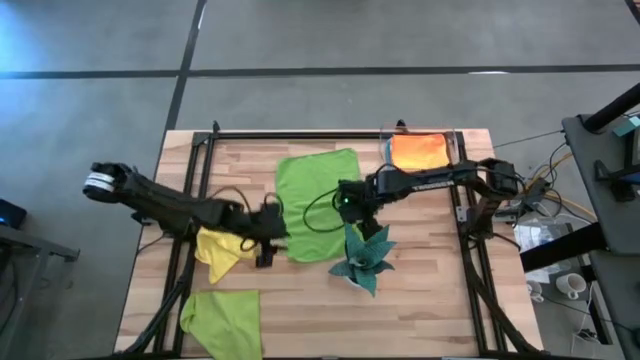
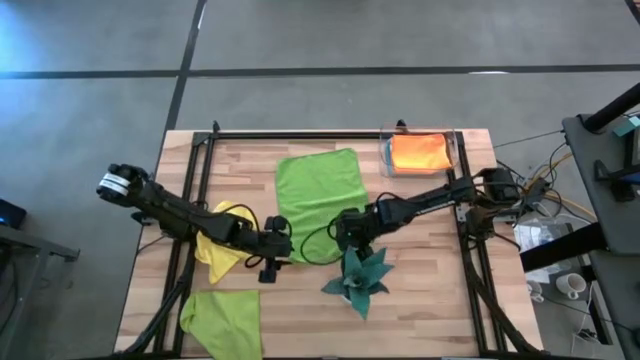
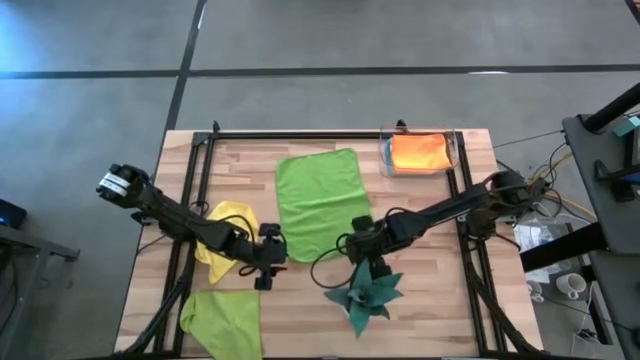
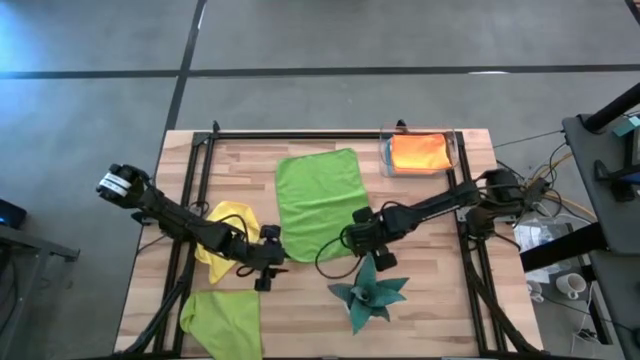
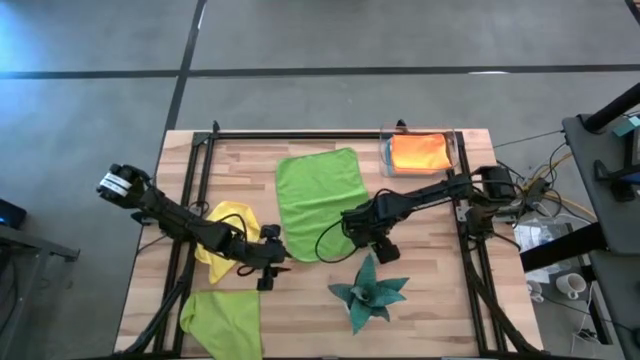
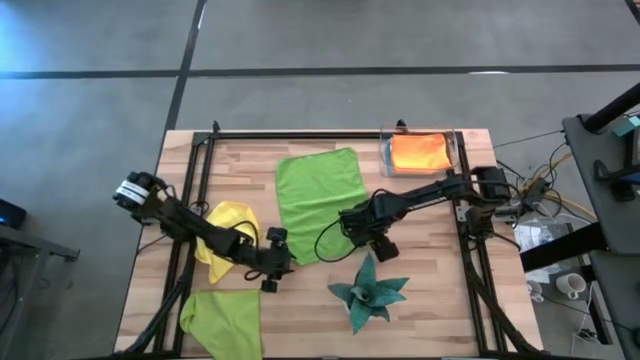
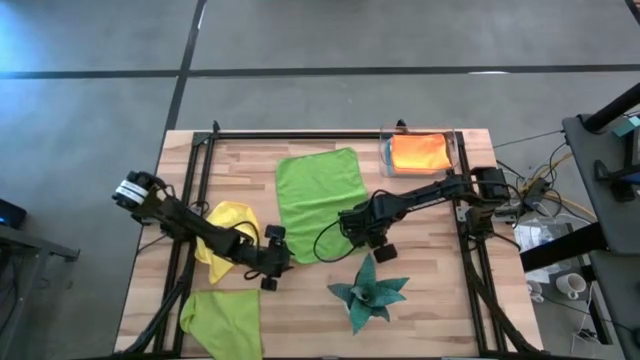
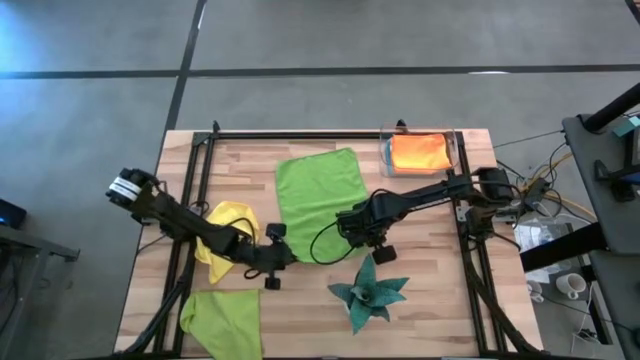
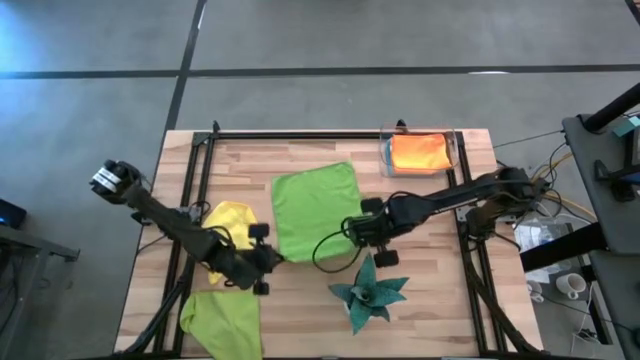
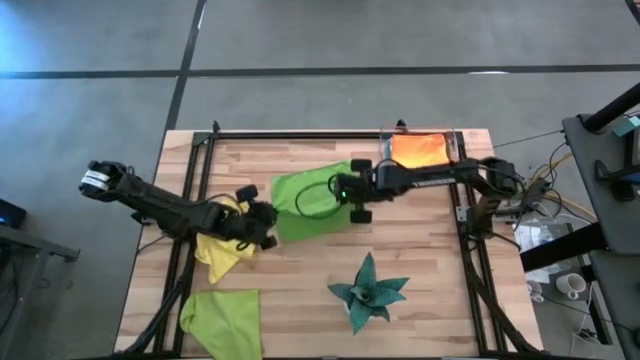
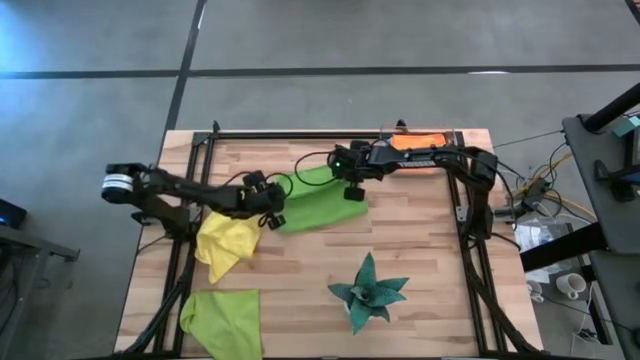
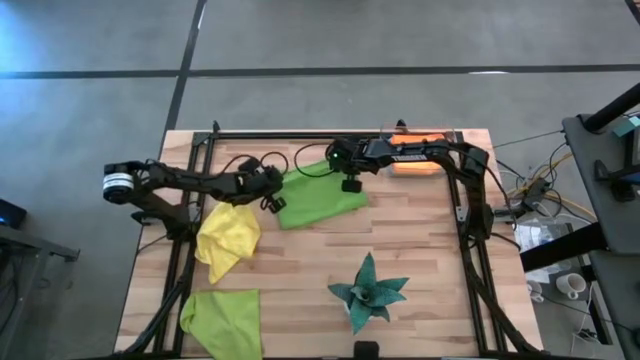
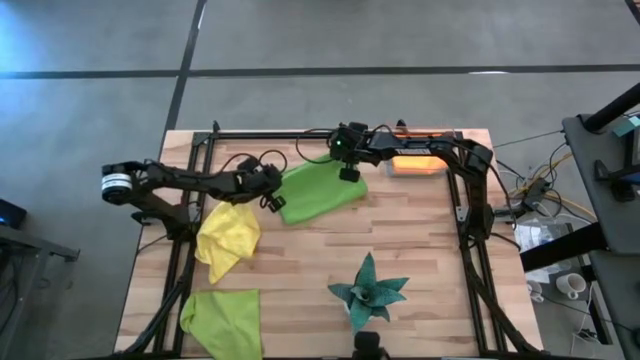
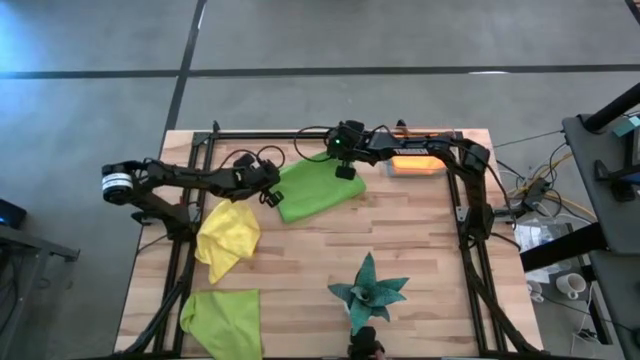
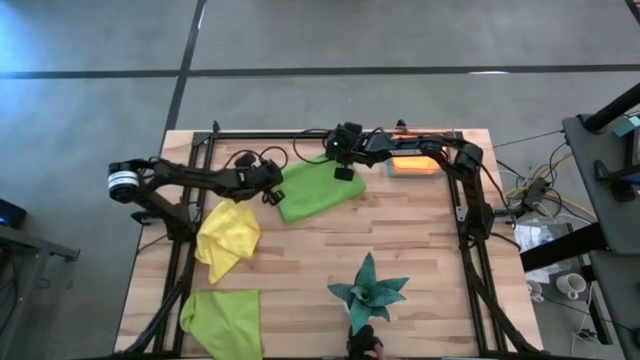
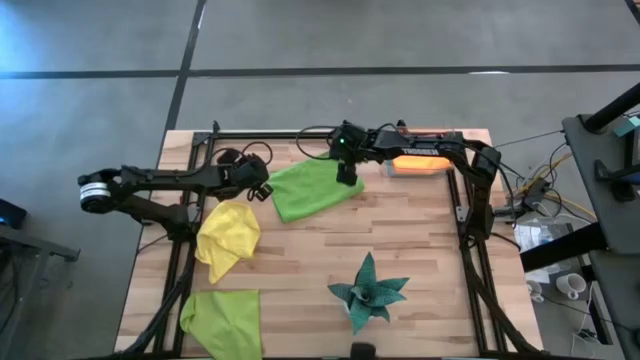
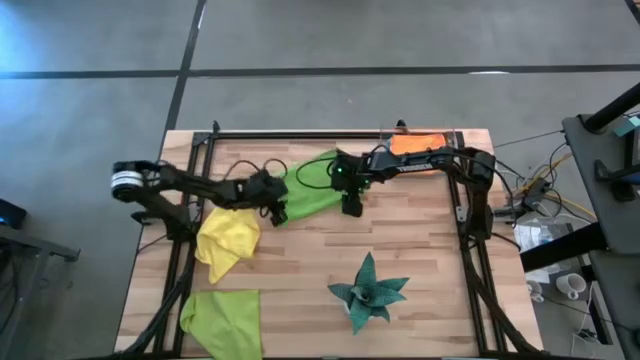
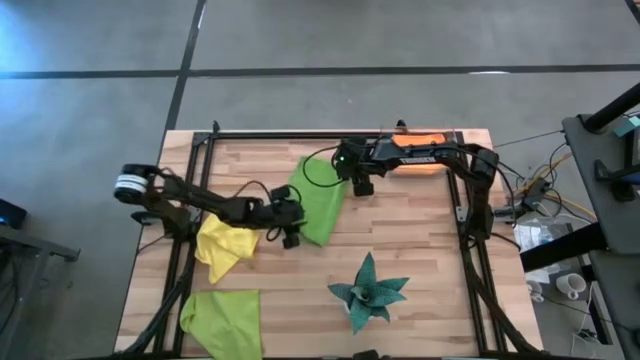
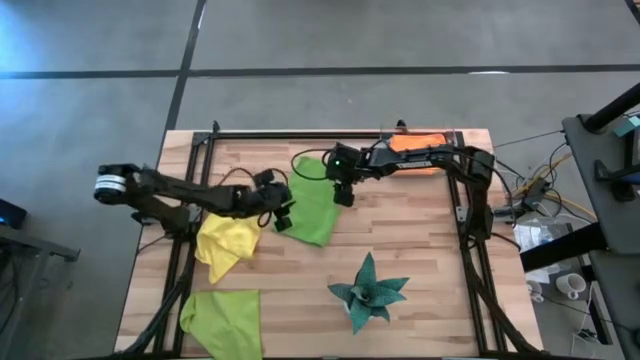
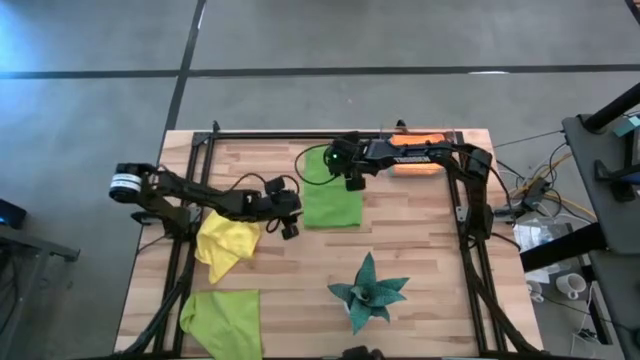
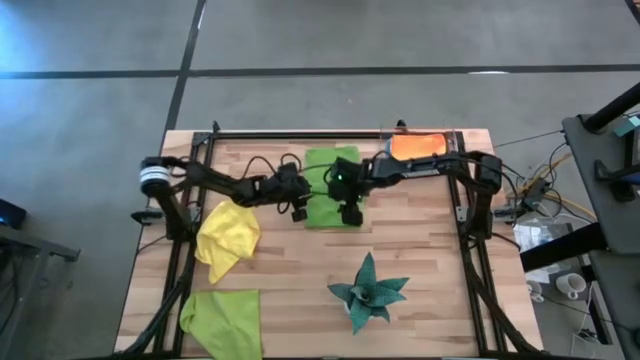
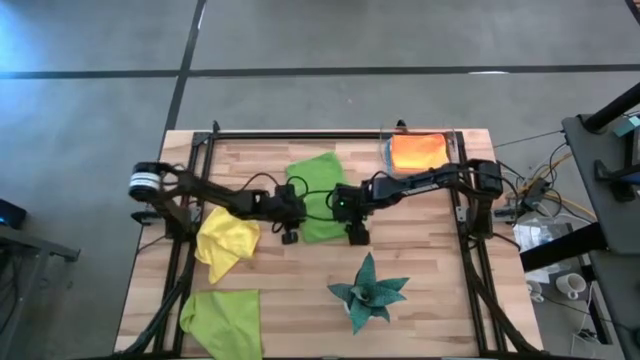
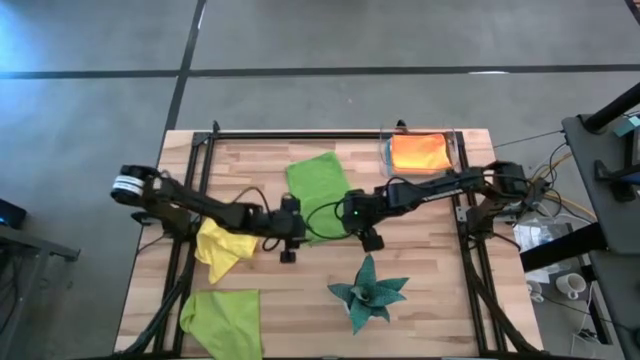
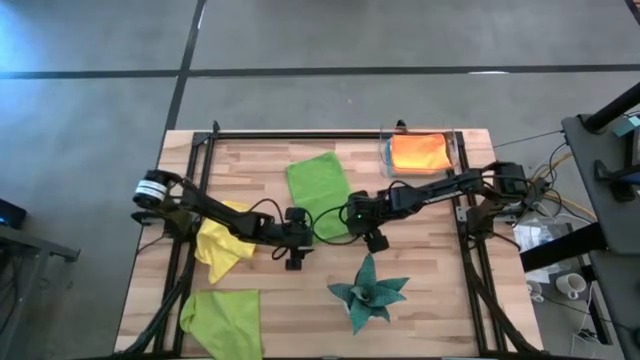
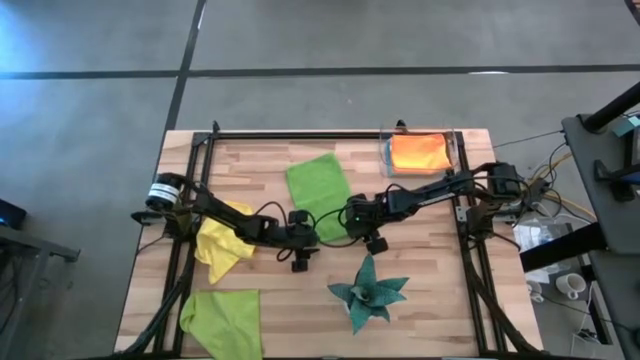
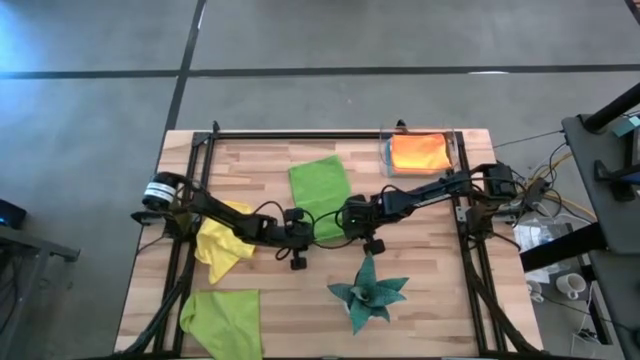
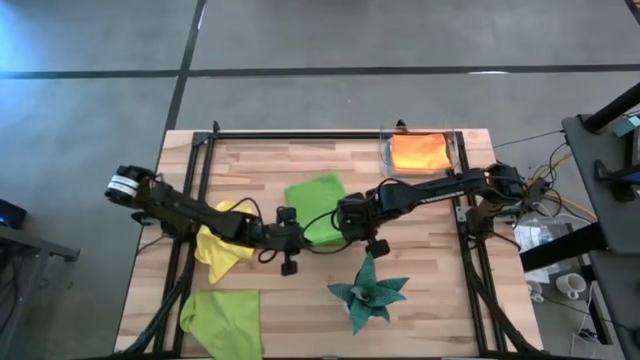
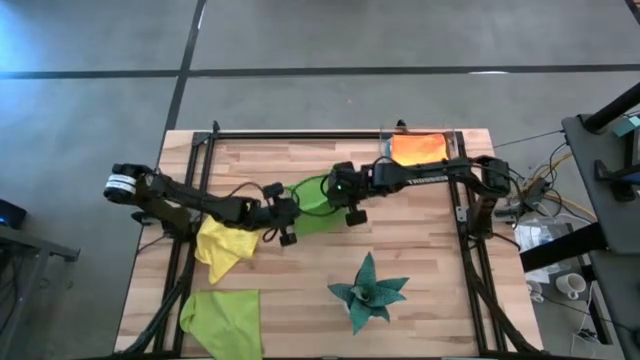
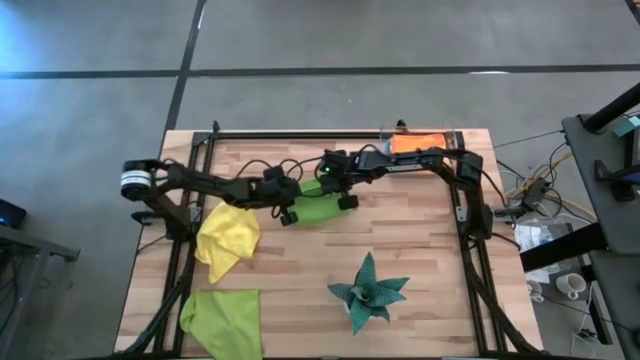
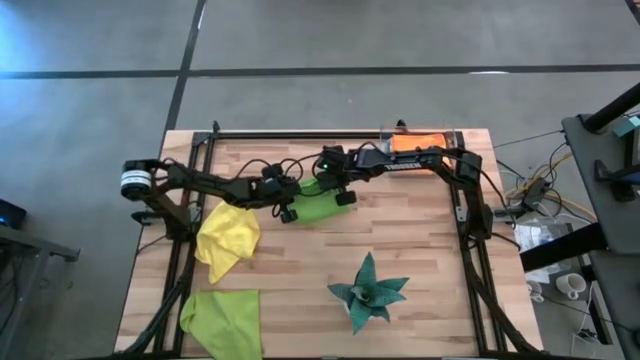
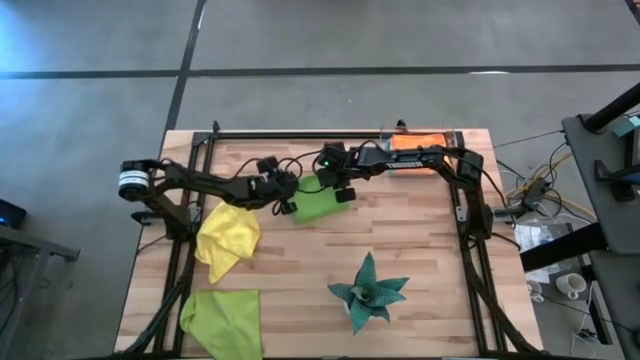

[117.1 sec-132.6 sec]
Task: Fold microfiber towels
Fold the green microfiber cloth

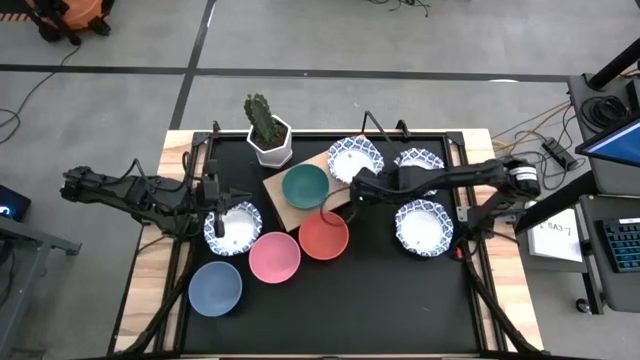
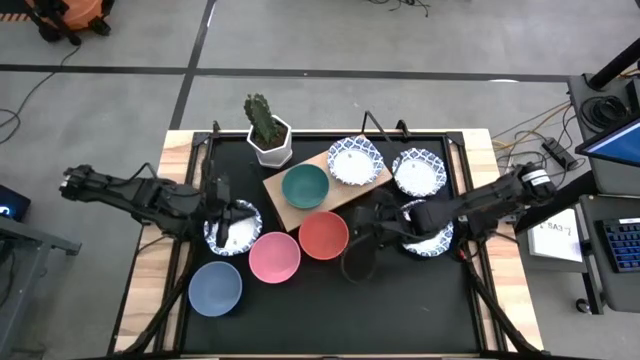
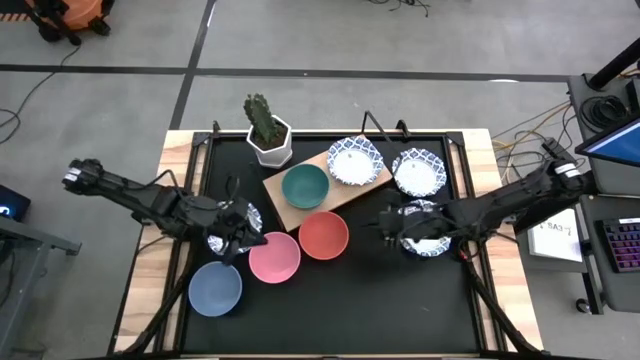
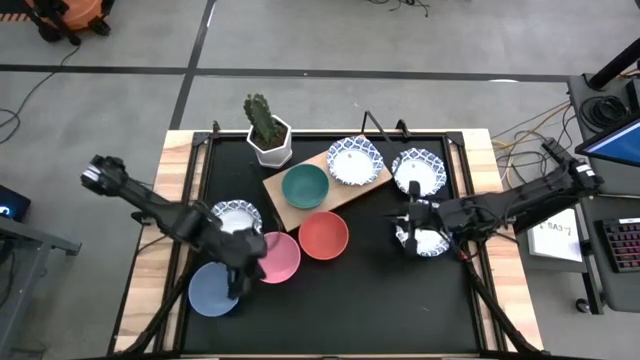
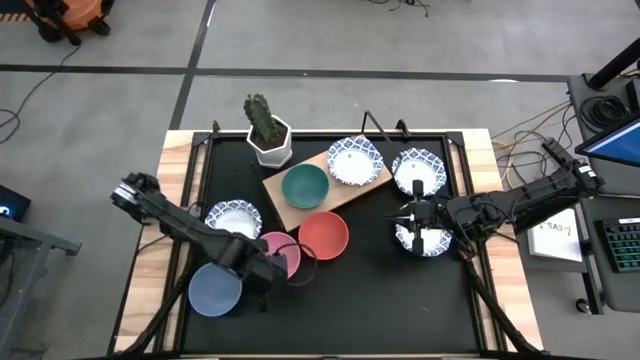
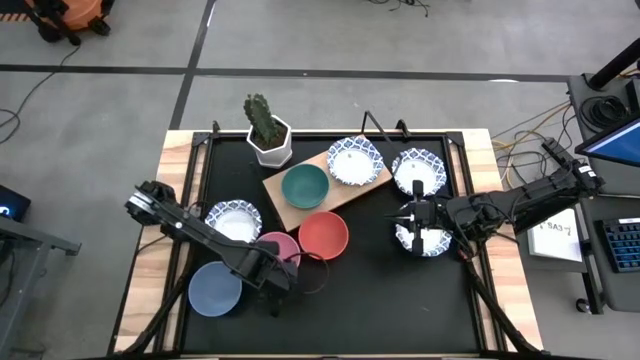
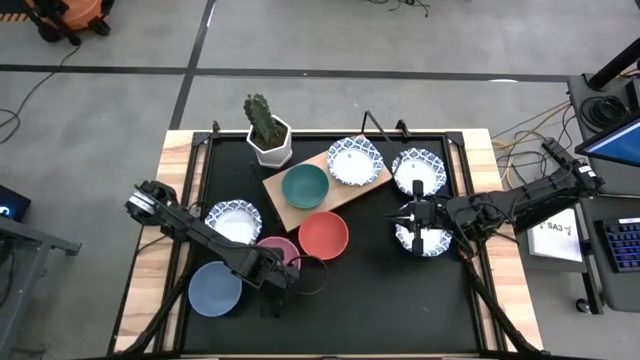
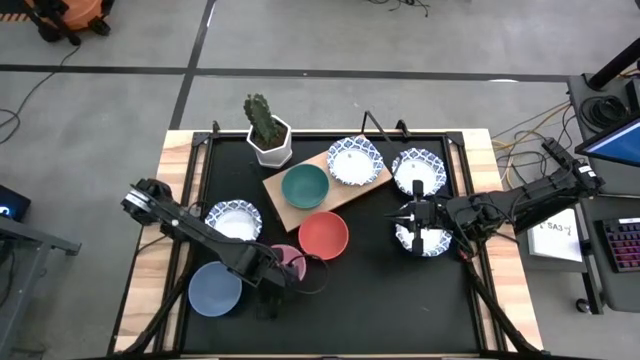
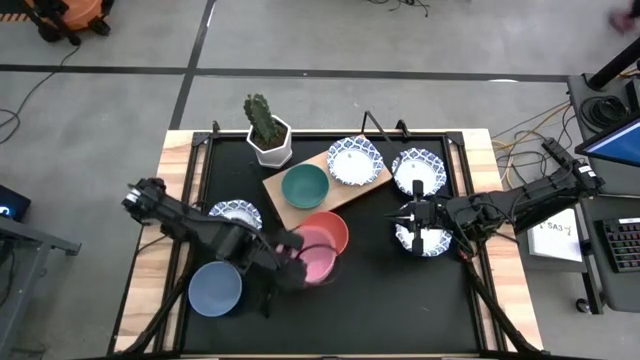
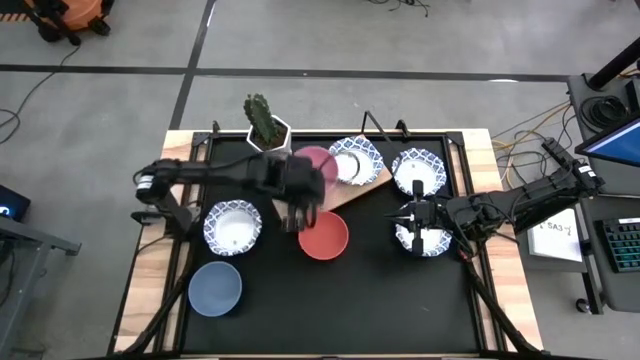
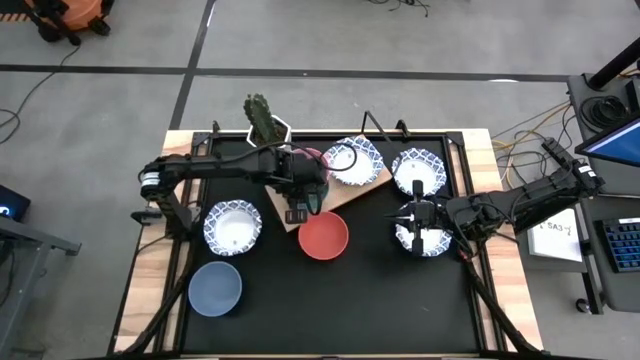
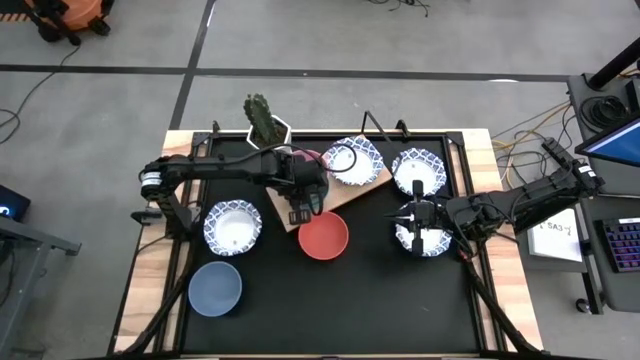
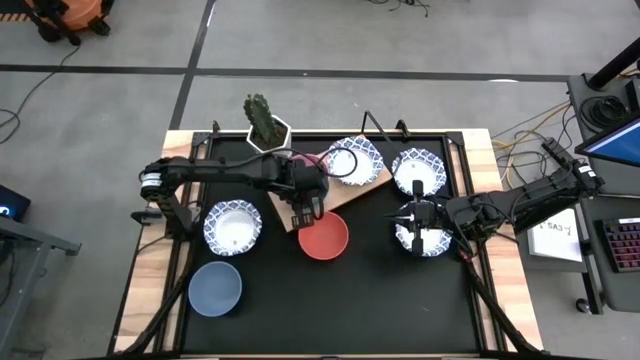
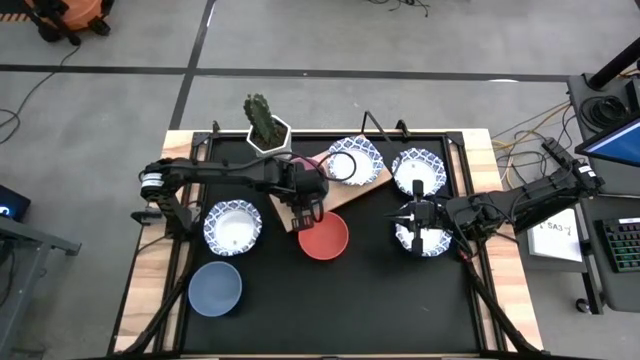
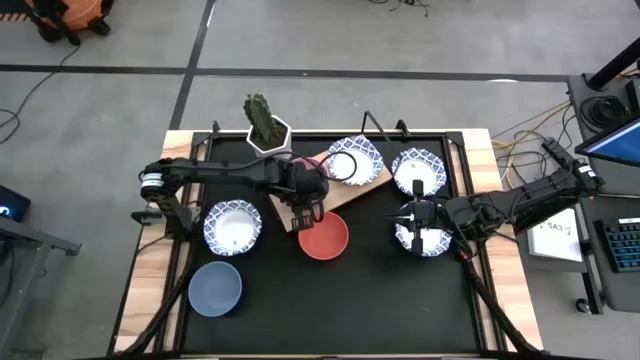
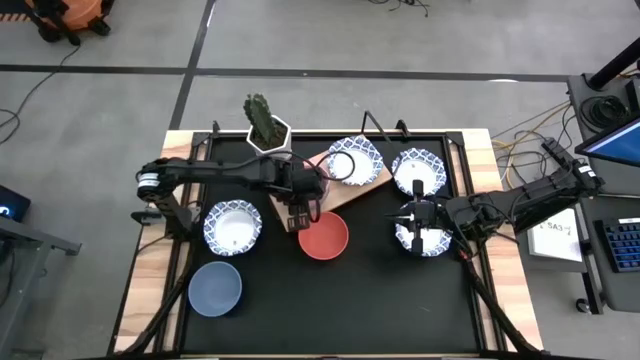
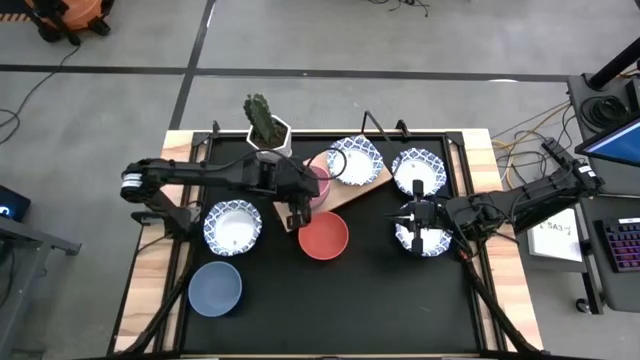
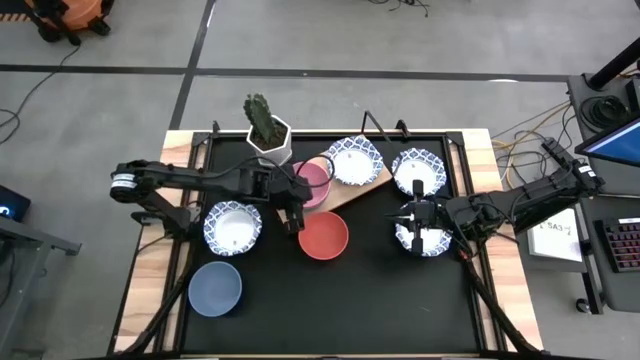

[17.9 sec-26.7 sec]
Task: Place and stack bowls onto a shelf
Stack the pink bowl on top of the green bowl on the shelf
